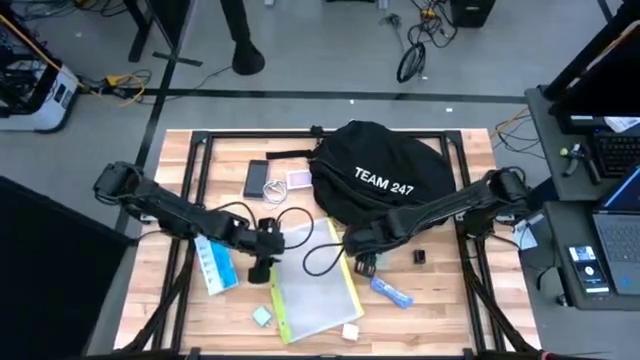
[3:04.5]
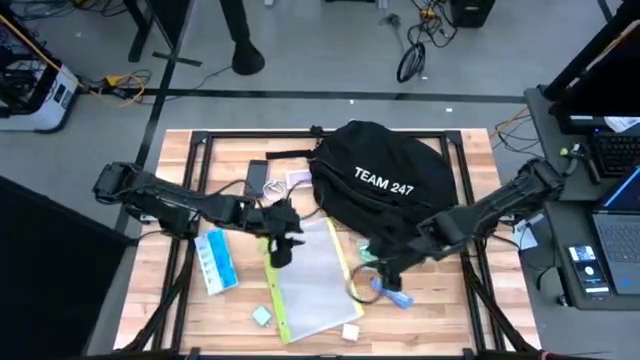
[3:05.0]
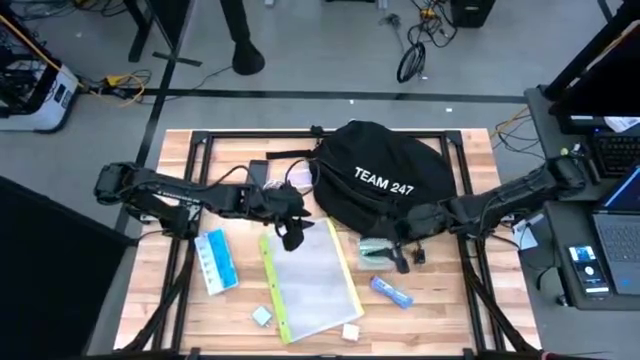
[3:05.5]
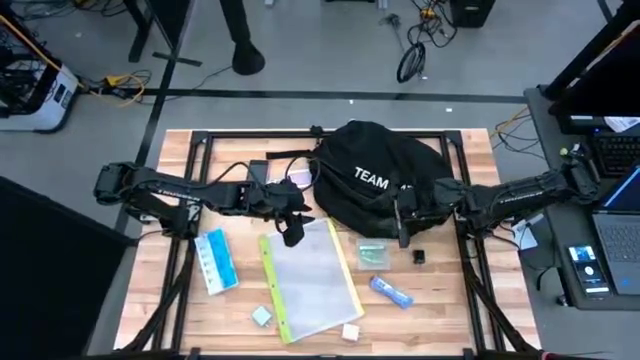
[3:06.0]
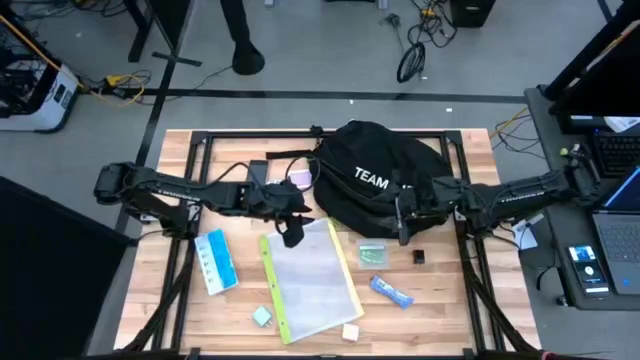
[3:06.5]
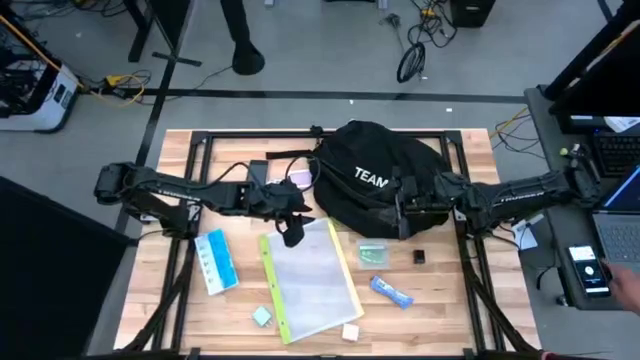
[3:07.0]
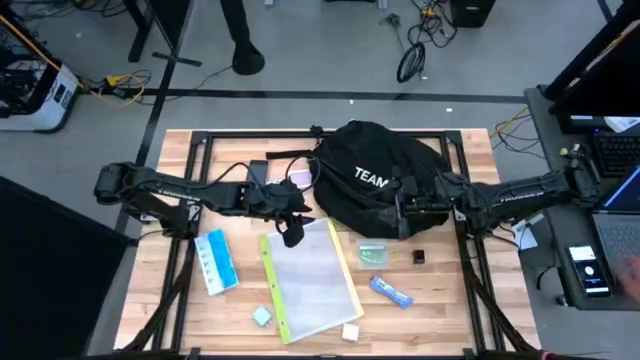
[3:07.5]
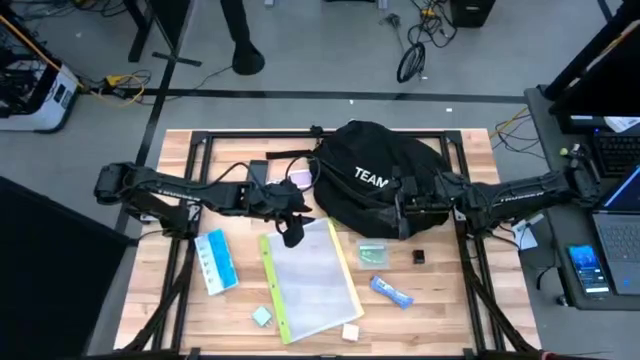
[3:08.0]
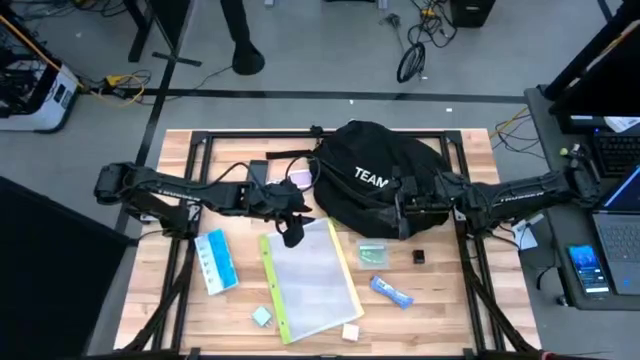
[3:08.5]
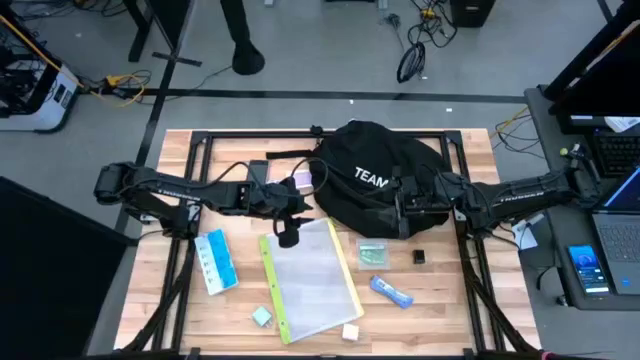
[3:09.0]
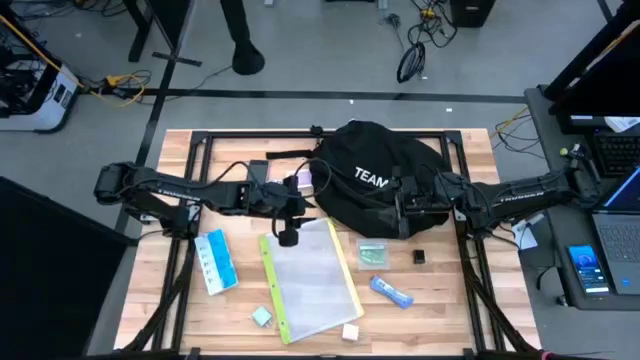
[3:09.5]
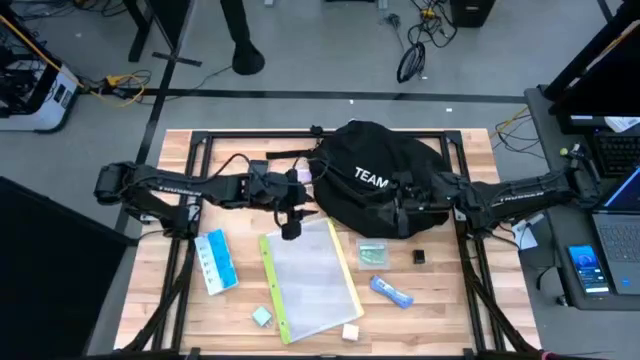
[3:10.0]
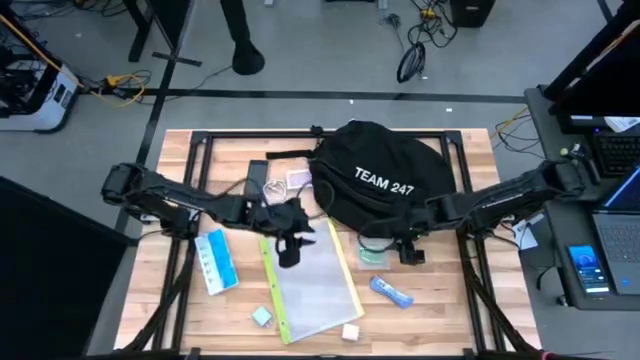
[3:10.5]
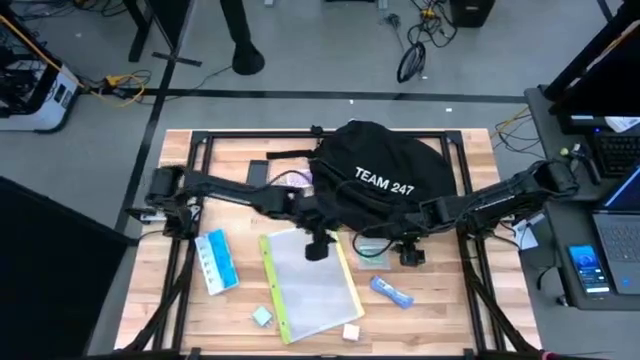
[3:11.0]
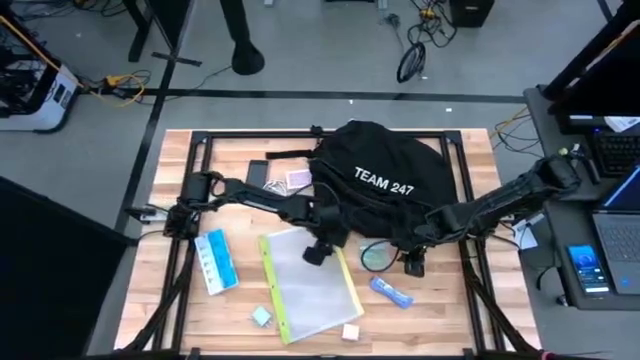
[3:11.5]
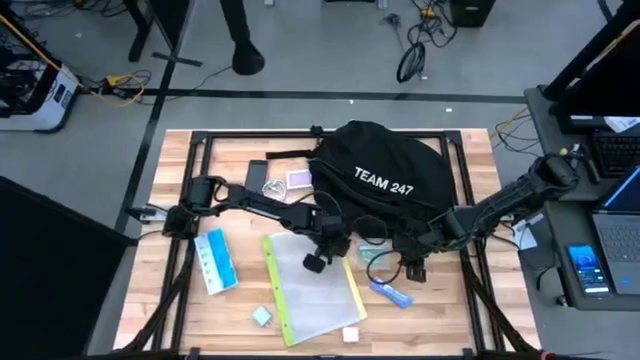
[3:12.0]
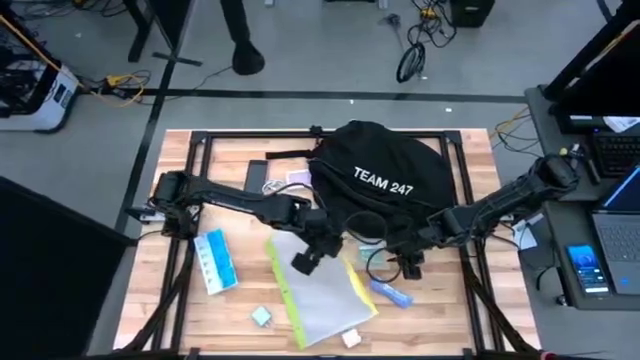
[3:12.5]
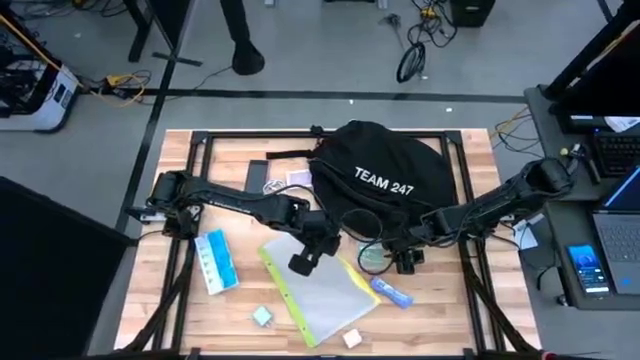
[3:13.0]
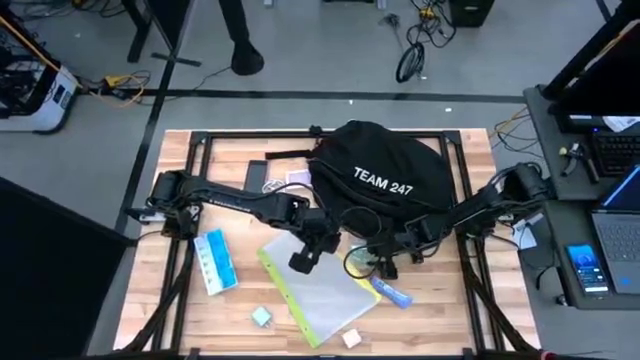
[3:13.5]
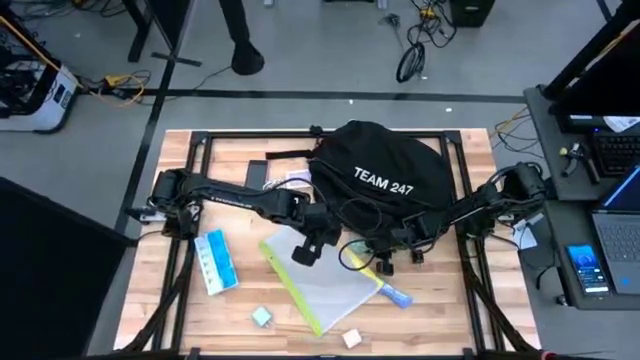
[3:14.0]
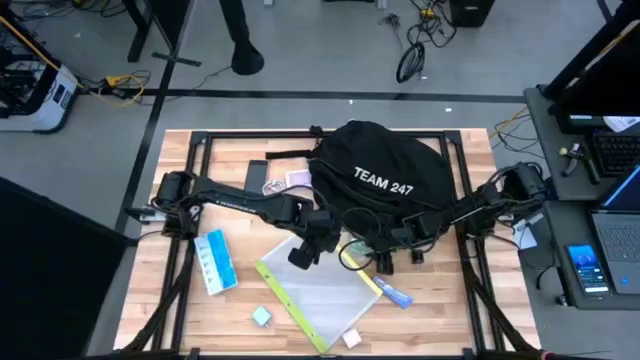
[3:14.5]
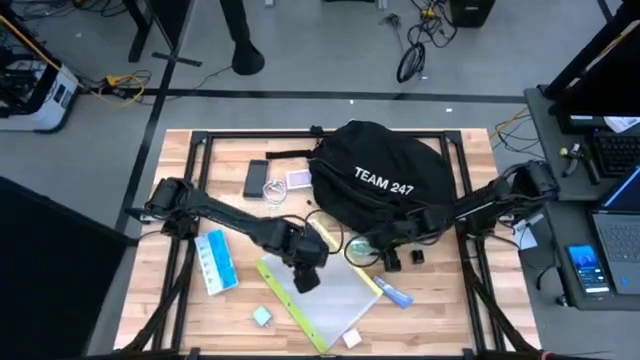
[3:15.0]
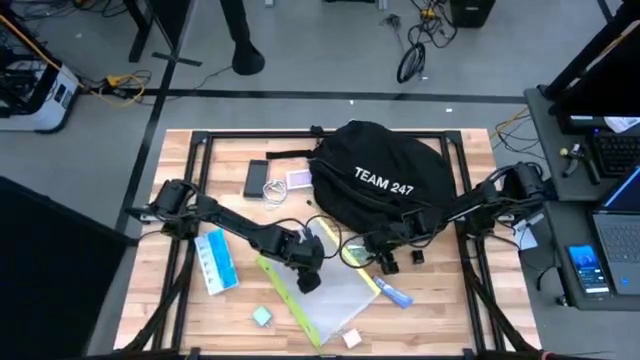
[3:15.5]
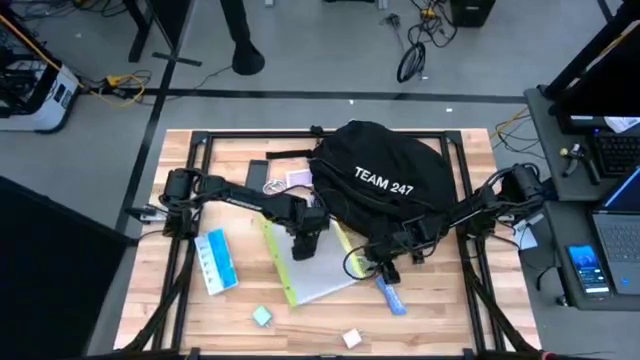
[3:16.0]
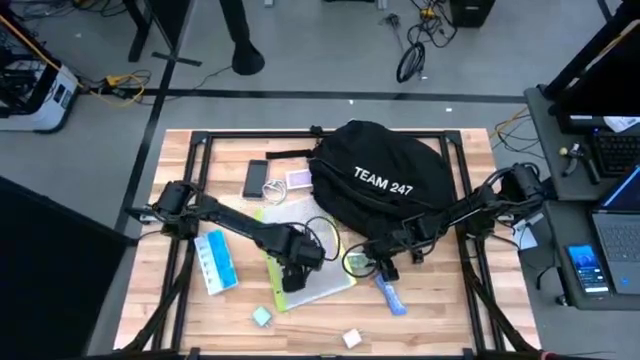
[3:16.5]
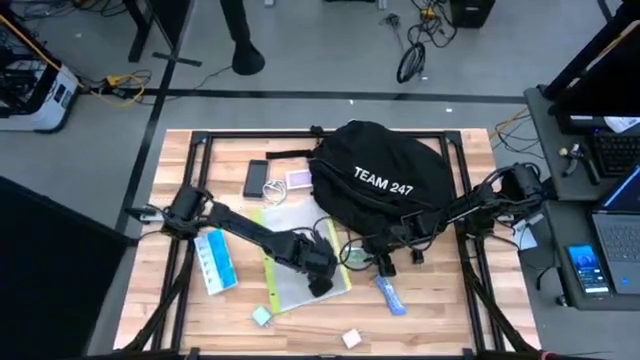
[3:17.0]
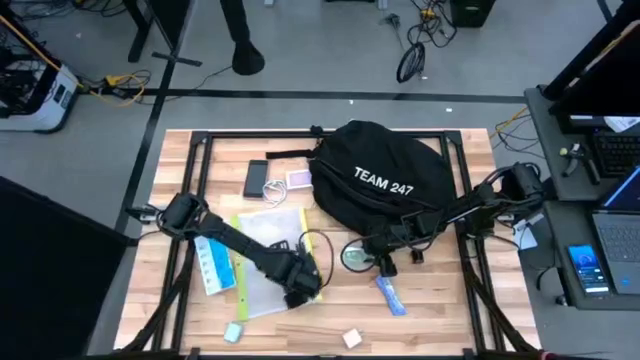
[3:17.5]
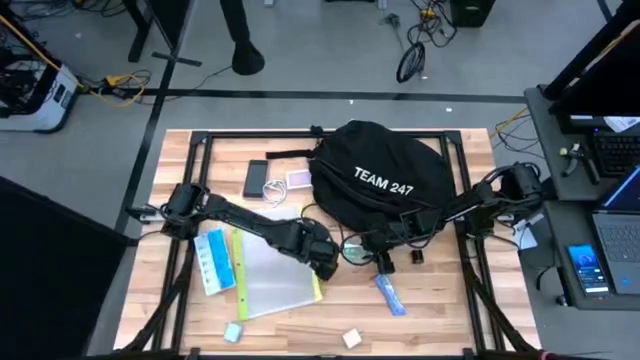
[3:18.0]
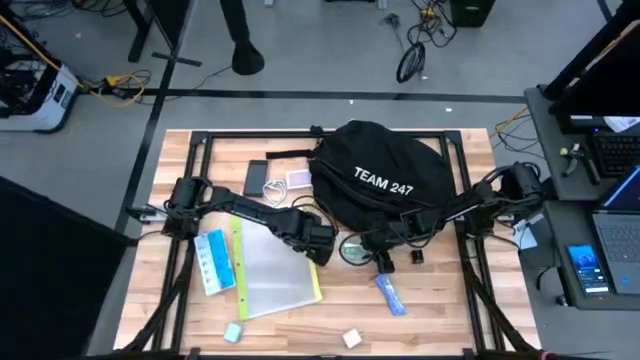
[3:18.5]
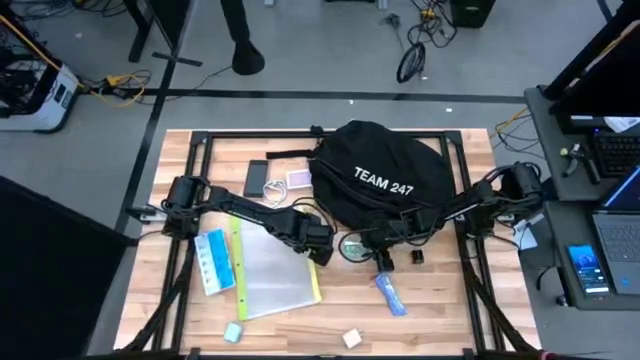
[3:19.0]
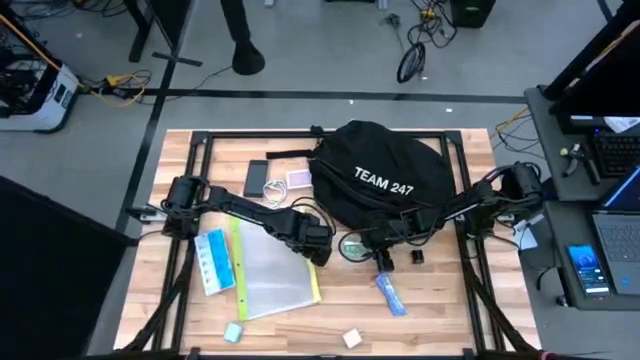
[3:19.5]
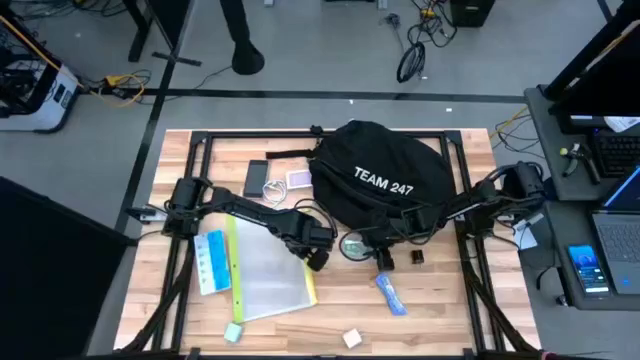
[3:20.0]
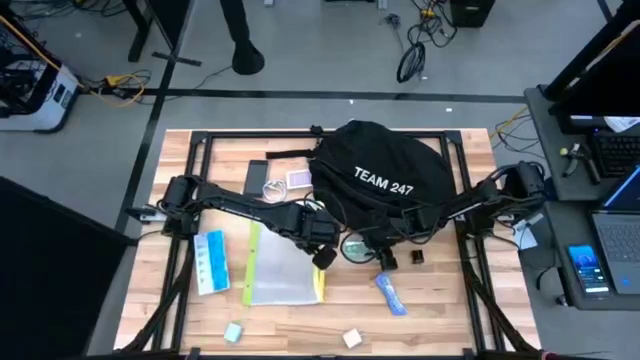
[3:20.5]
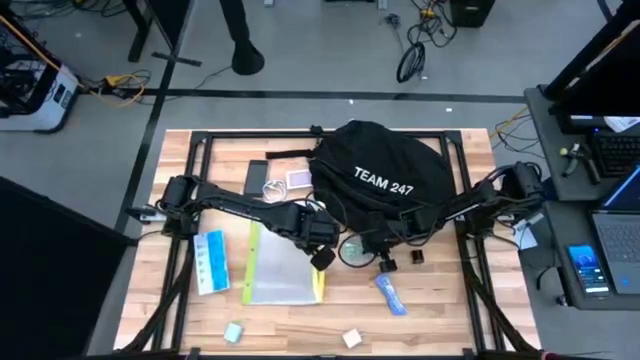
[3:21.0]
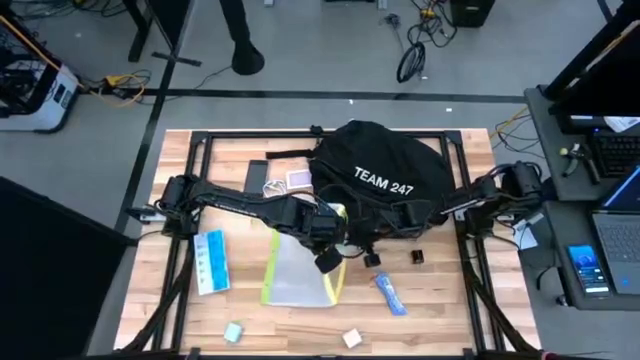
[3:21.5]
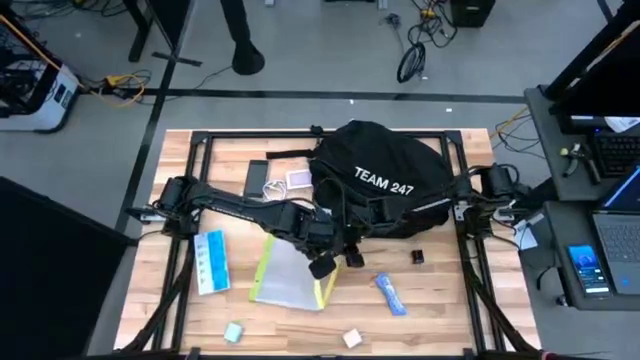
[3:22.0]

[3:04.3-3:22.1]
Task: Unpack backpack
Put the earphones into the green zip bag

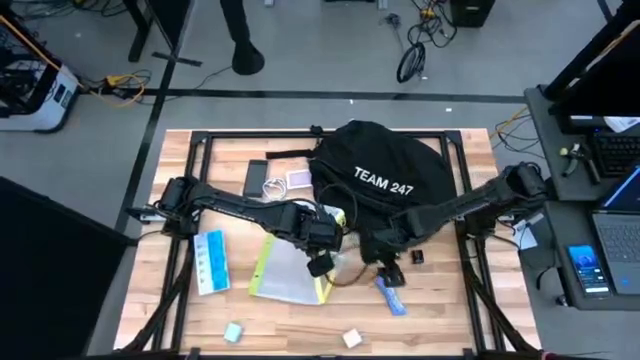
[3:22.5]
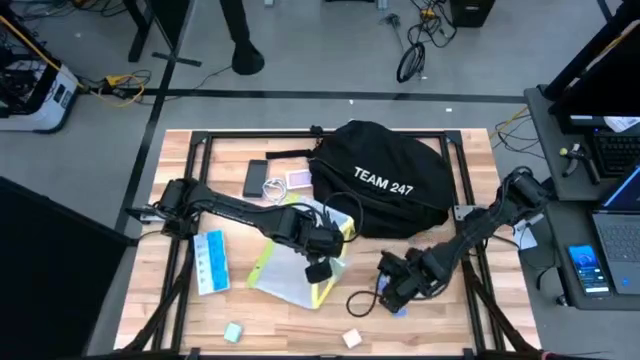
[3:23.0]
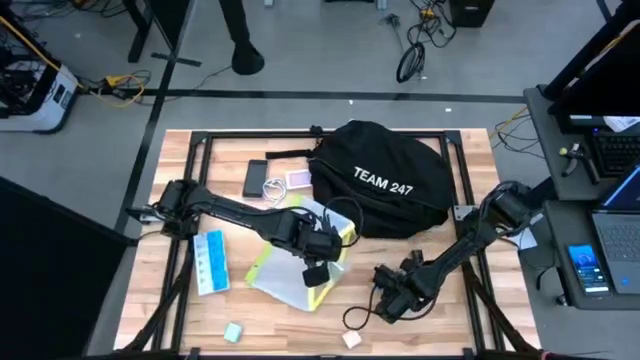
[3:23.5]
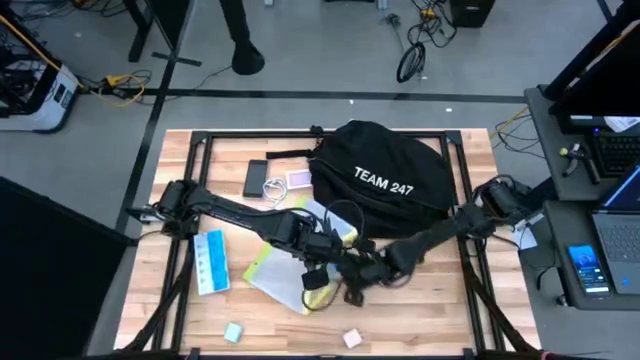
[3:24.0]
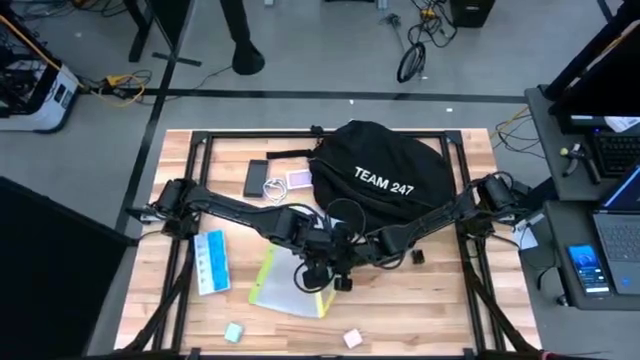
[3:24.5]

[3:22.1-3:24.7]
Put the violet chocolate bar into the green zip bag

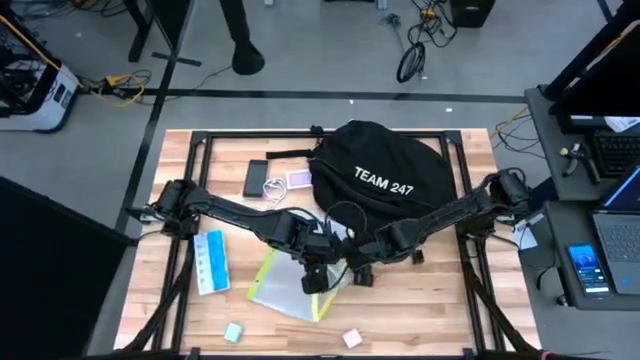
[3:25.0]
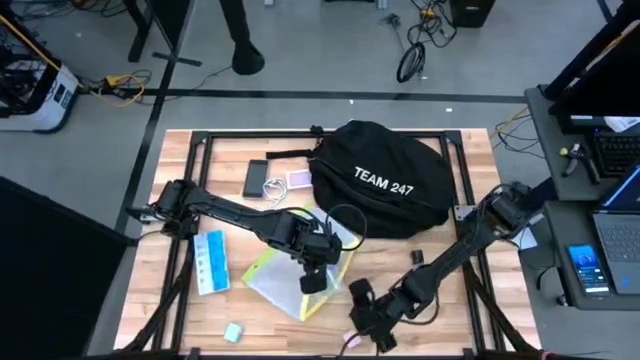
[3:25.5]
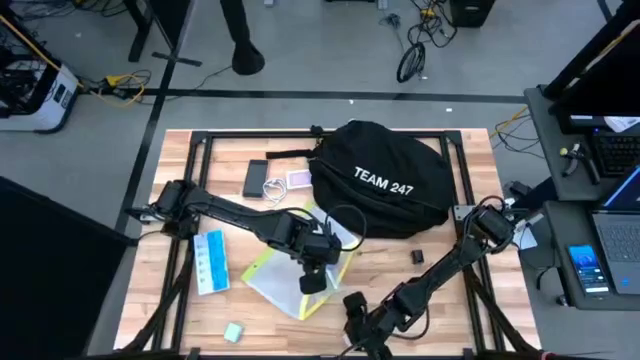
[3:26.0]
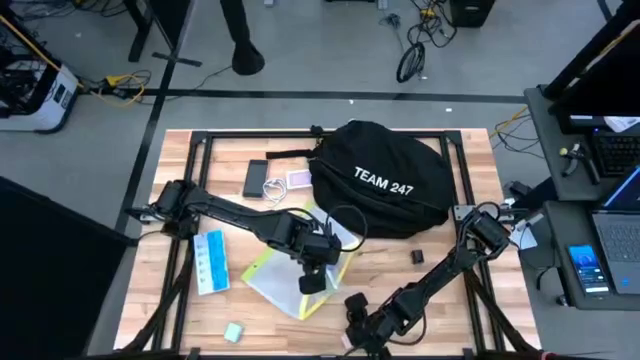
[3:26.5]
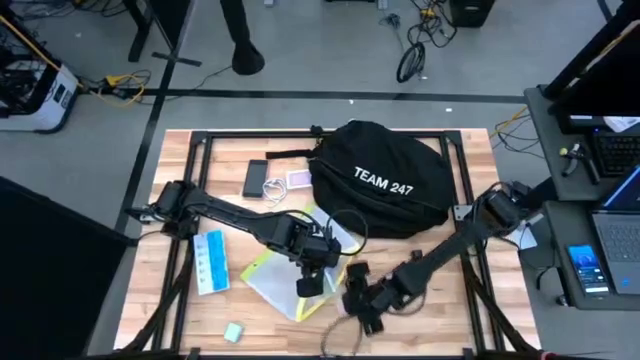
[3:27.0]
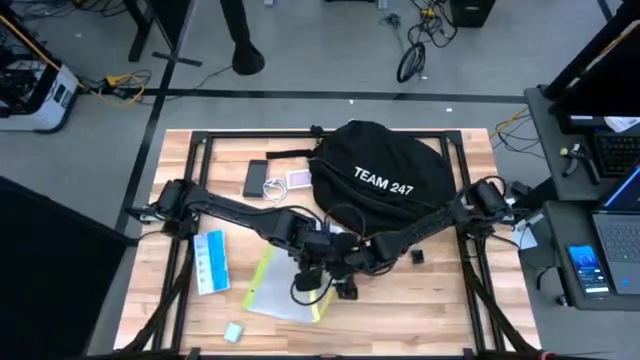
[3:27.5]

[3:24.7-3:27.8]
Put the pink charger adapter into the green zip bag
